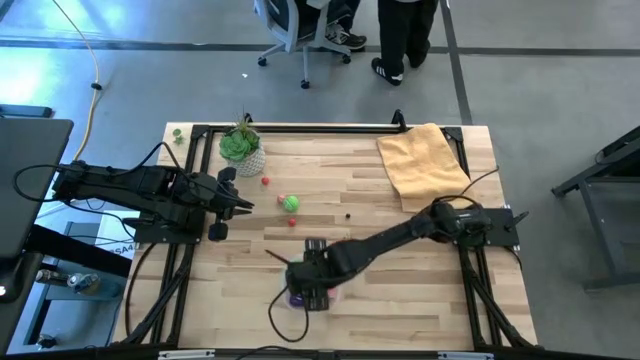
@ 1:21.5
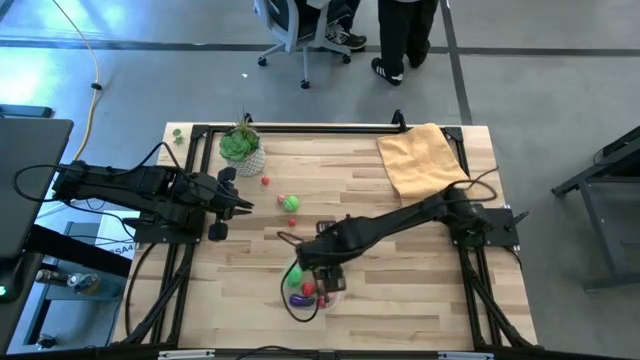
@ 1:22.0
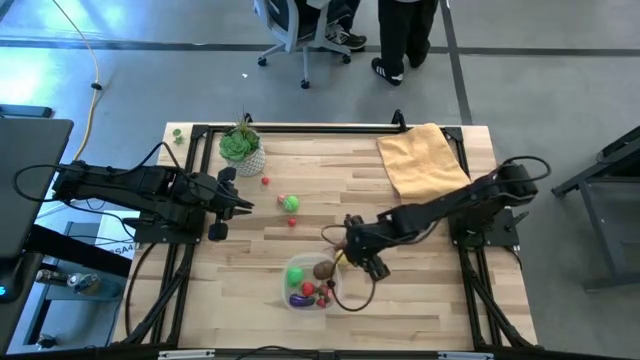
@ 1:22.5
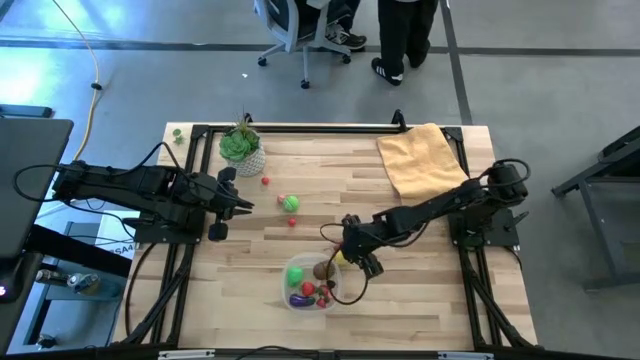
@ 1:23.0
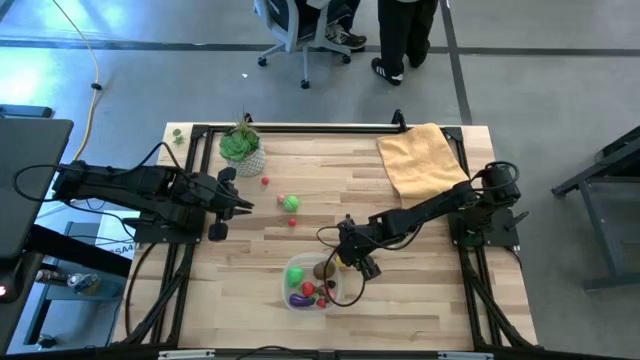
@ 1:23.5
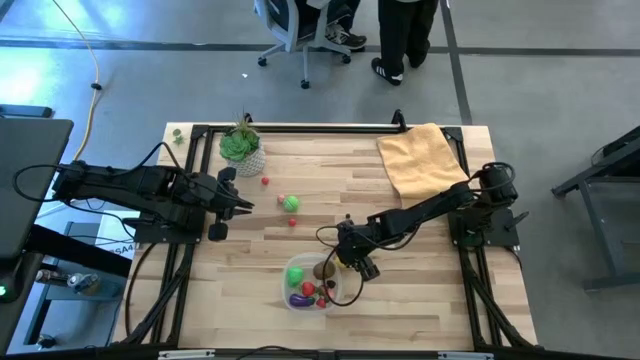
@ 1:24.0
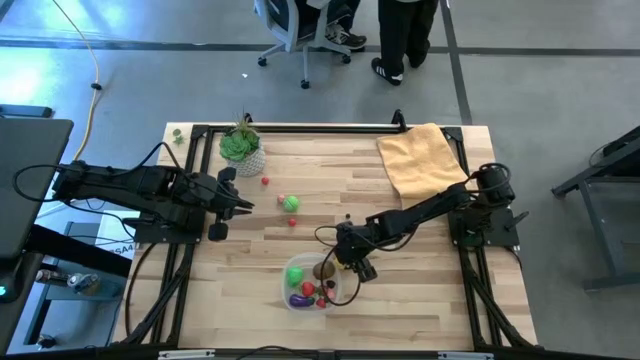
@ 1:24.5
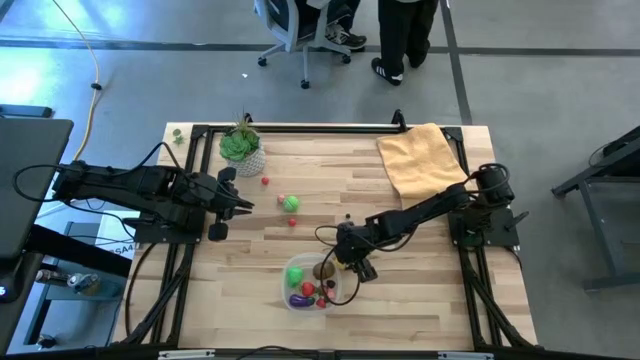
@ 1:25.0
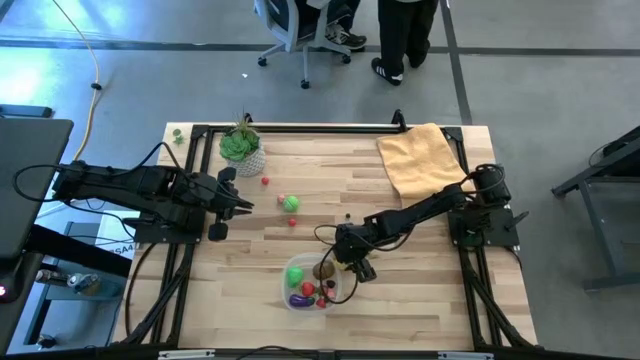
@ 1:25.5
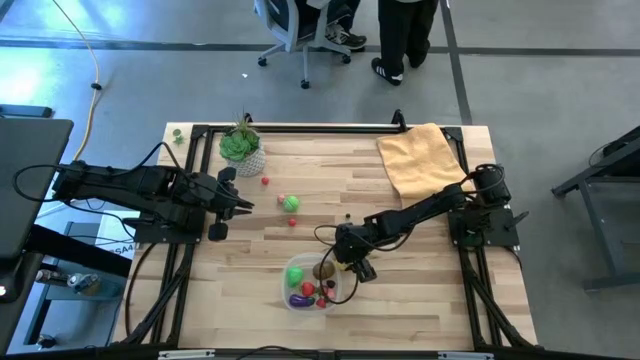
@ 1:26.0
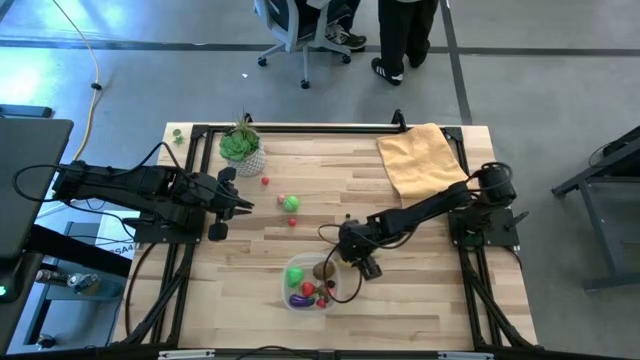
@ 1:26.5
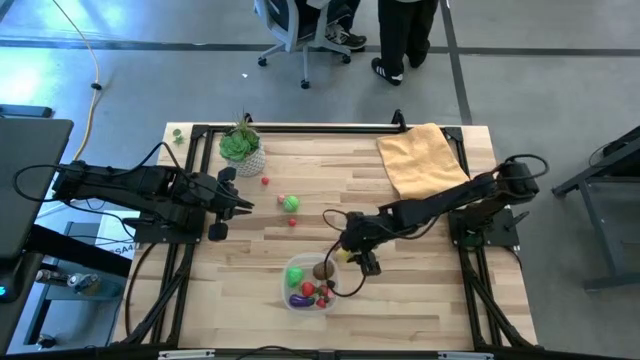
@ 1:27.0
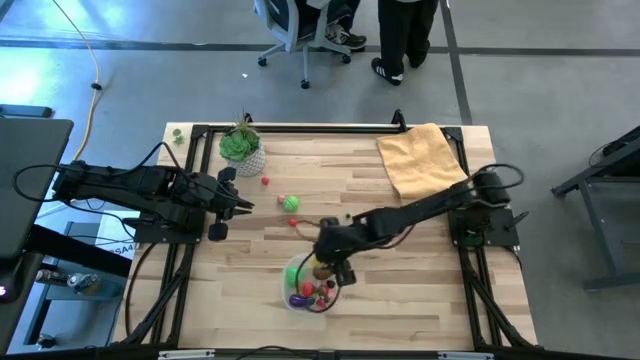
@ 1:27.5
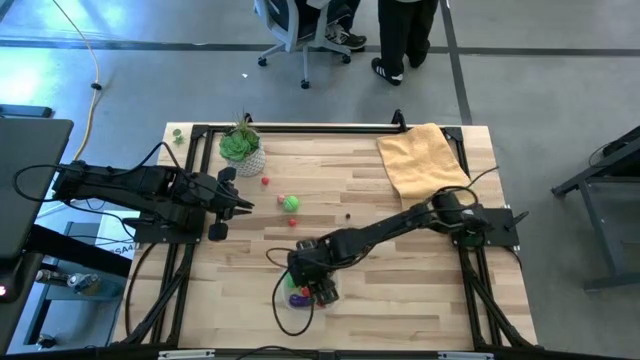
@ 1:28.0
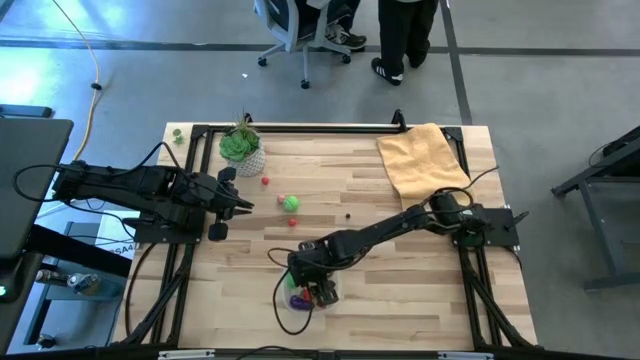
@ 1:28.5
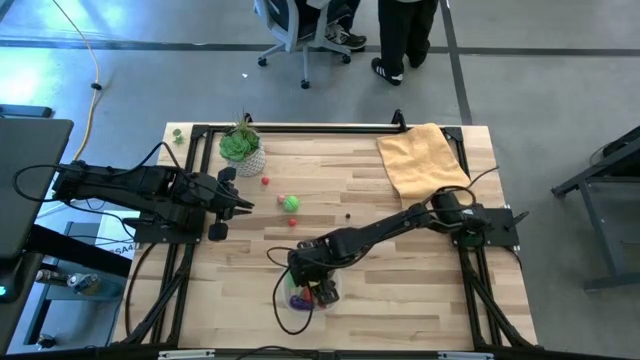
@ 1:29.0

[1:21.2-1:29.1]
Task: Pick and placing Produce into tupperware
Put the yellow lemon into the transparent bin

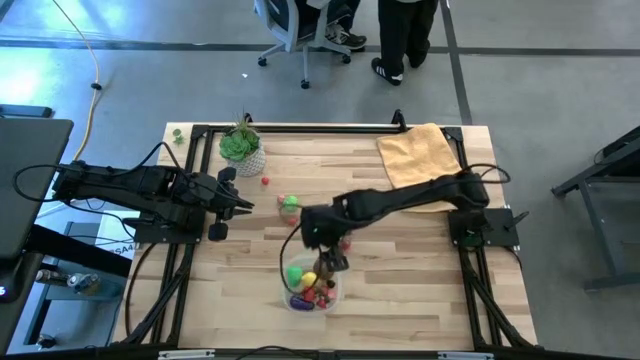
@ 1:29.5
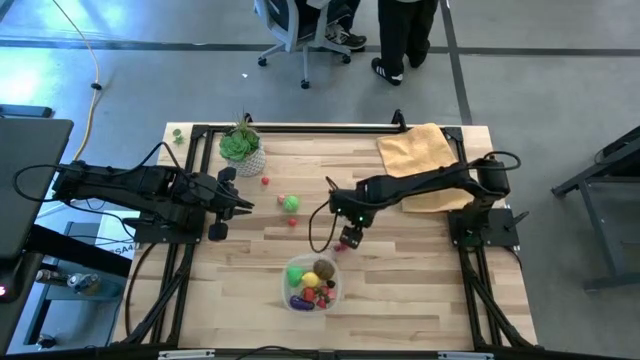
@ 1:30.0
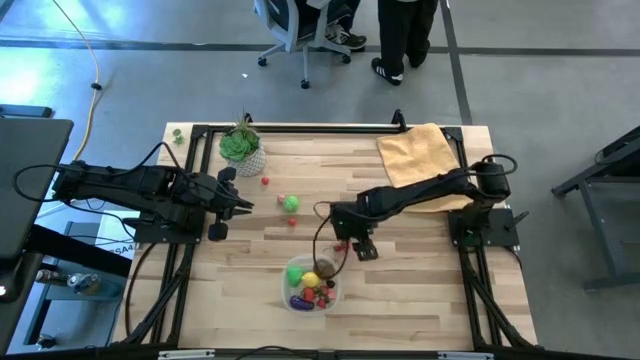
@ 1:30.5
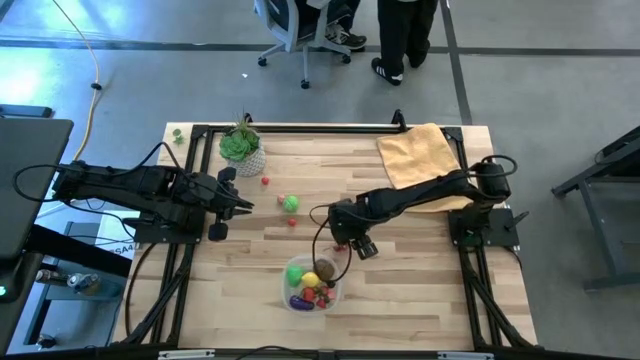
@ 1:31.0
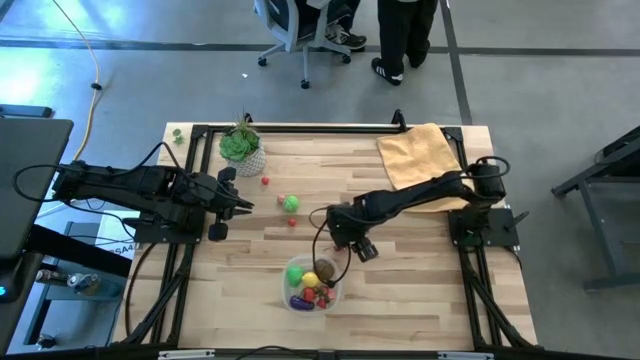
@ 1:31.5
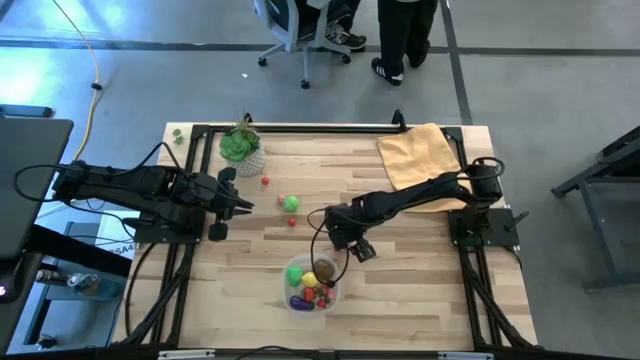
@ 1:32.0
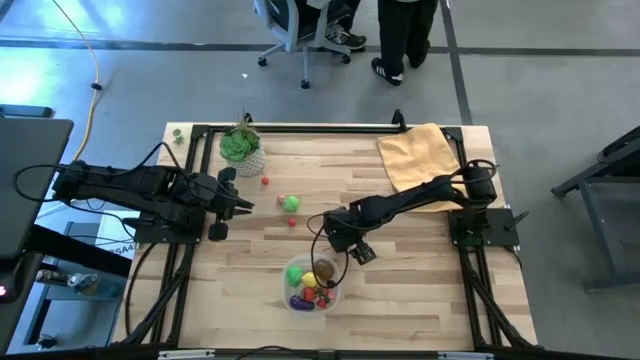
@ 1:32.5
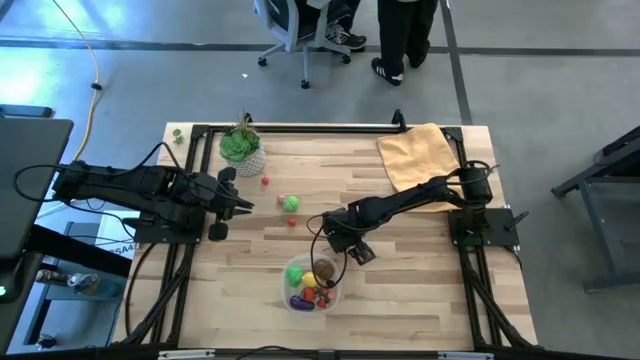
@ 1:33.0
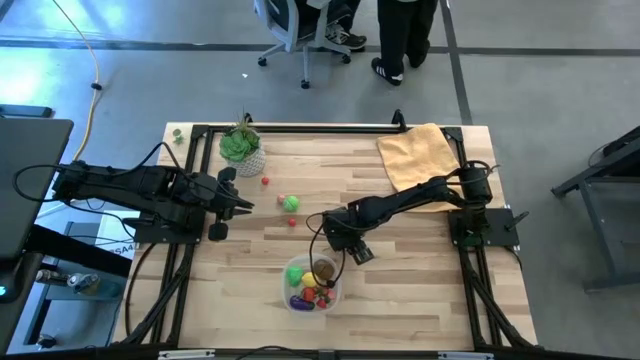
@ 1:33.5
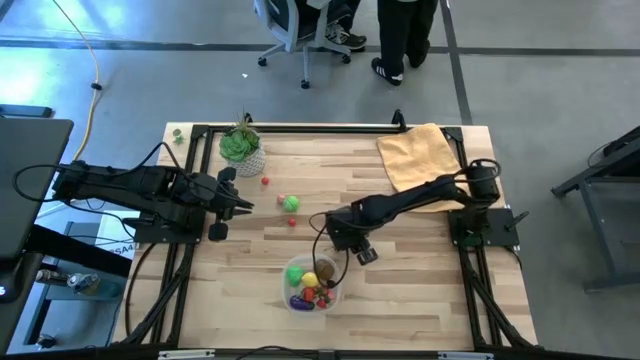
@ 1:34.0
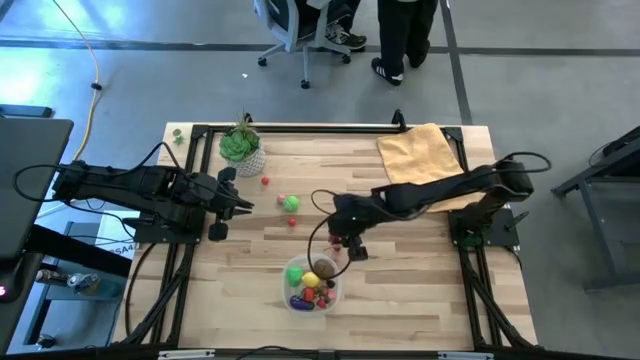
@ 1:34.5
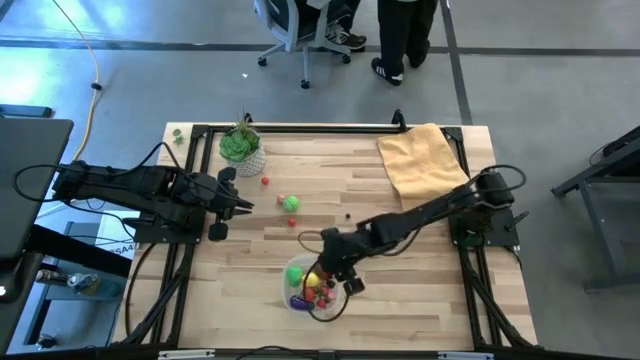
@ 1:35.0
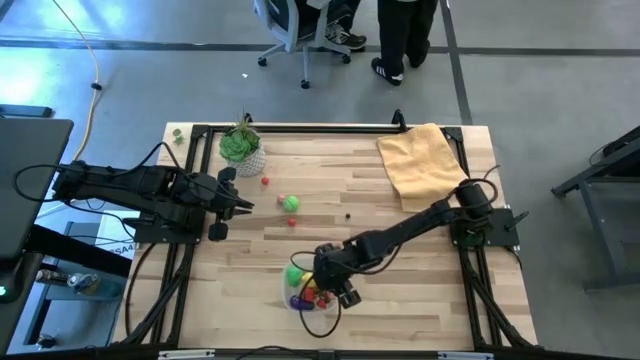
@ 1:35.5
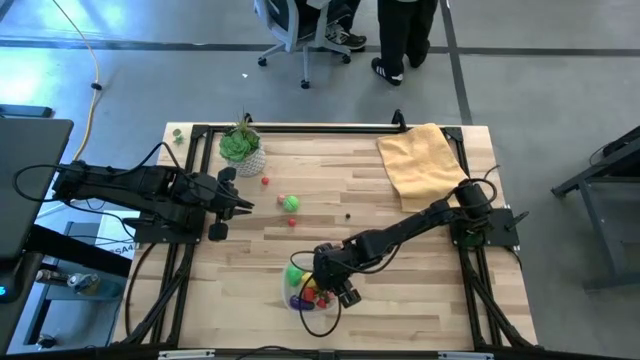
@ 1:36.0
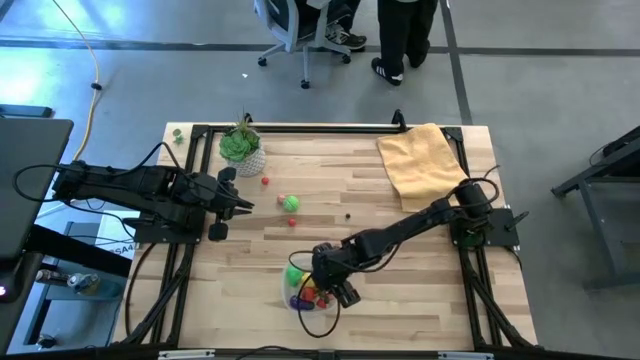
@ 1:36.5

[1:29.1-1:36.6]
Put the red strawberry into the transparent bin

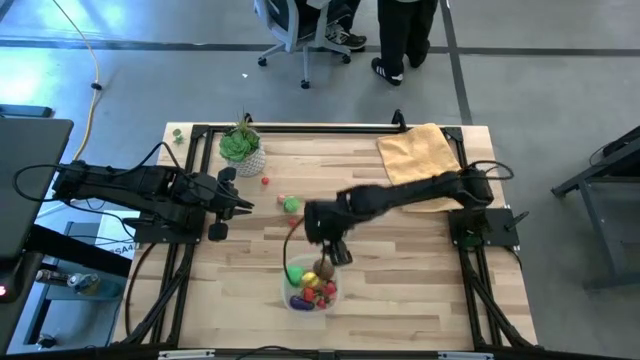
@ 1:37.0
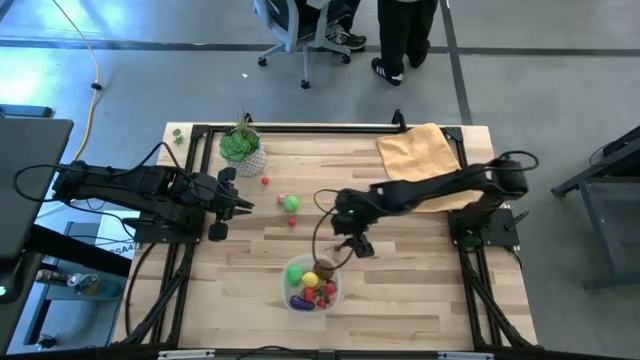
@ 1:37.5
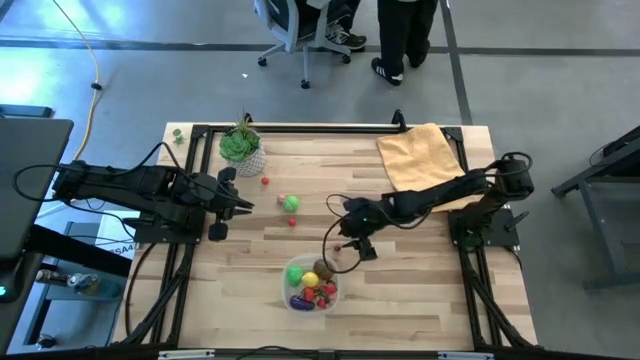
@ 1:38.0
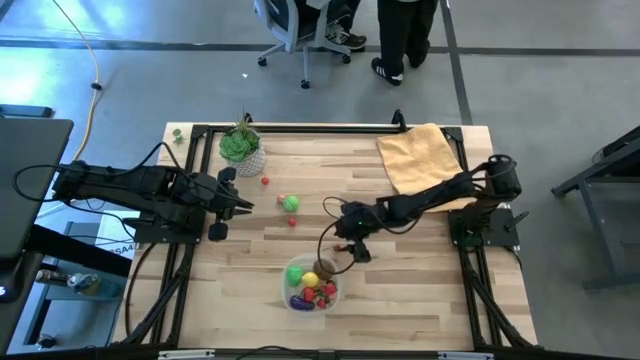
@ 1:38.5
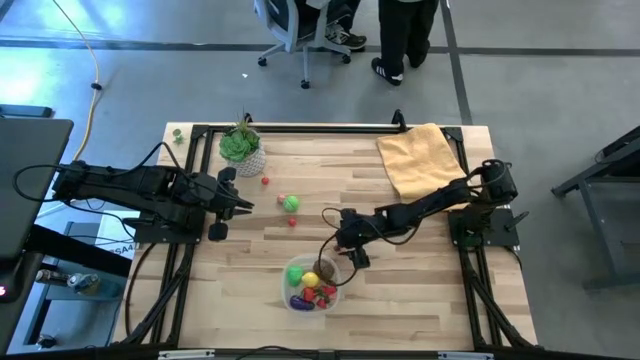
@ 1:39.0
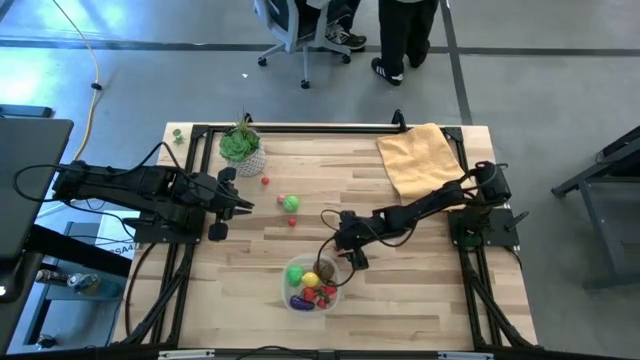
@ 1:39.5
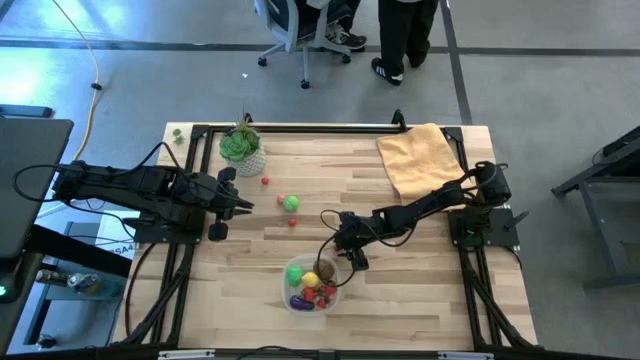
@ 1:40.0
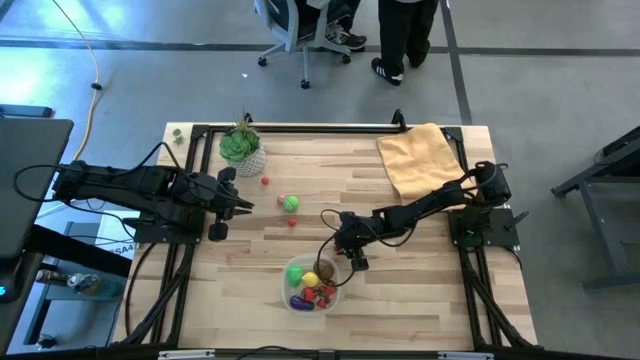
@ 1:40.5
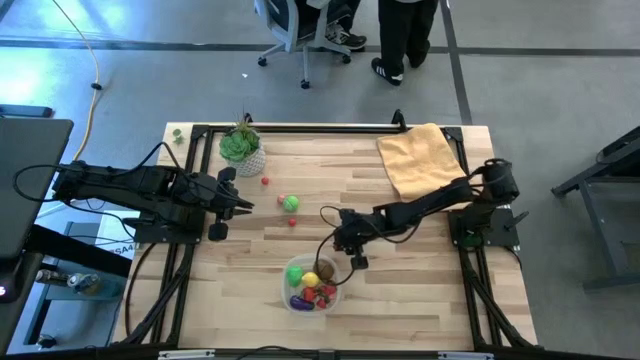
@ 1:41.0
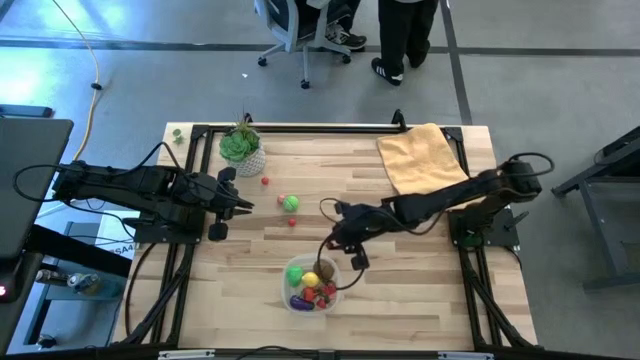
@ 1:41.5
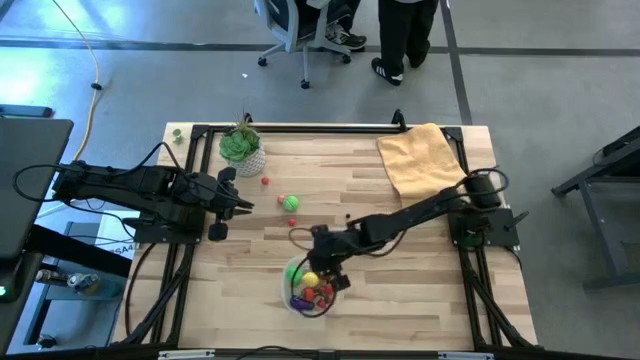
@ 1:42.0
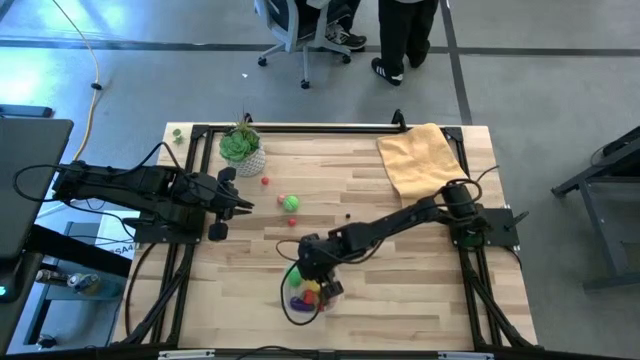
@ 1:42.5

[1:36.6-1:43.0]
Put the red cherry into the transparent bin

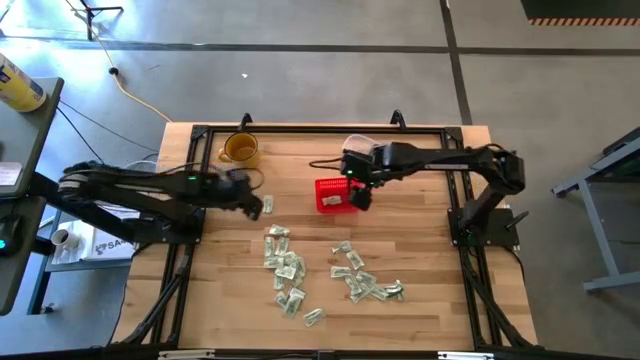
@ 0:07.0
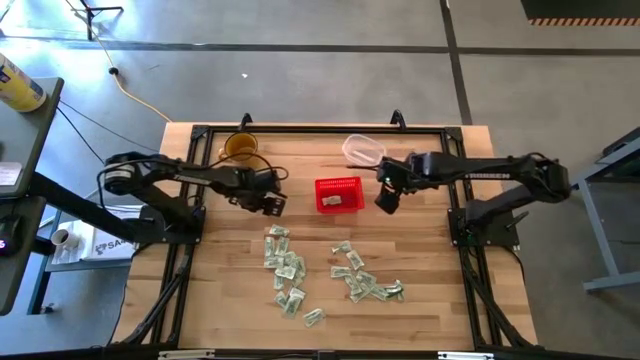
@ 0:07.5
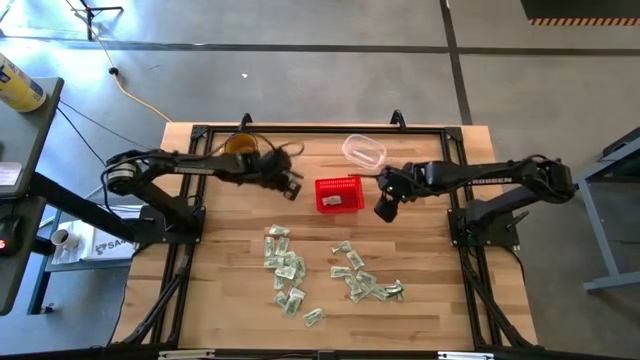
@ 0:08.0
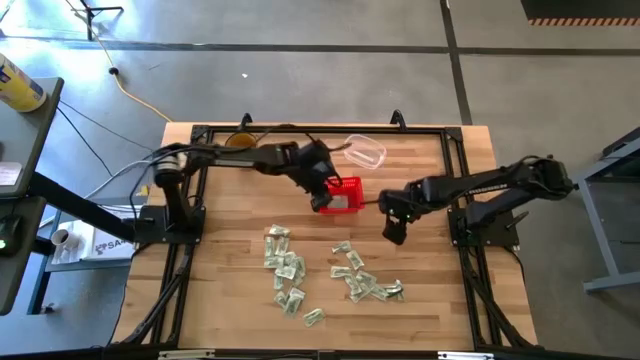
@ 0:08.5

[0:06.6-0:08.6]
Task: Pick and place items into bin
Put the white packet into the red basket
